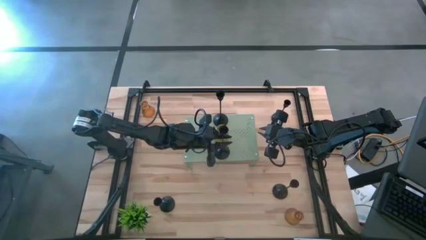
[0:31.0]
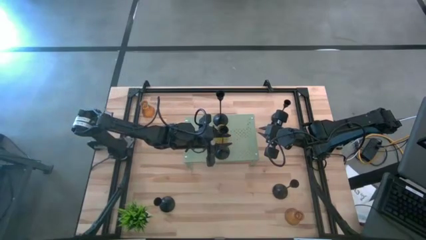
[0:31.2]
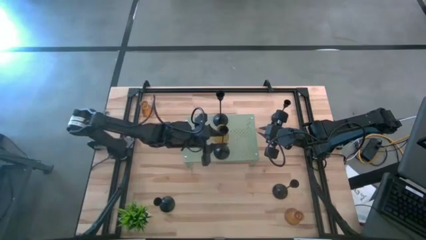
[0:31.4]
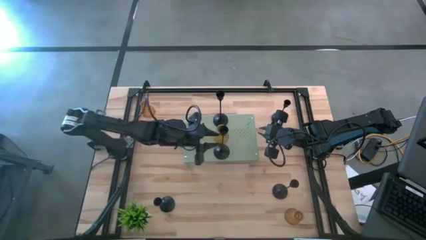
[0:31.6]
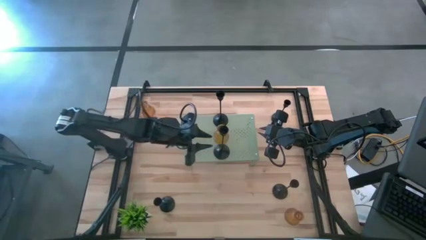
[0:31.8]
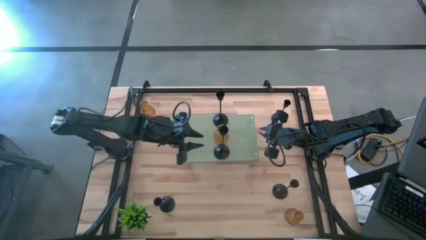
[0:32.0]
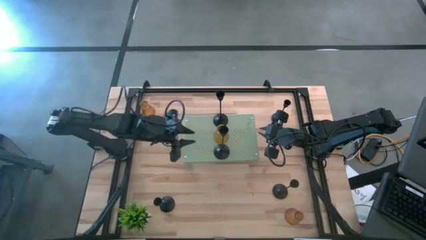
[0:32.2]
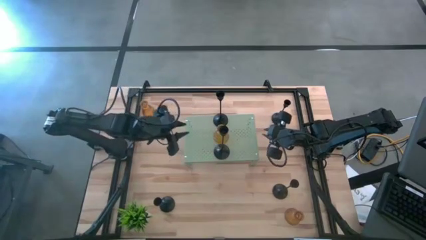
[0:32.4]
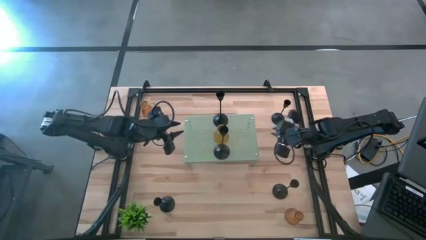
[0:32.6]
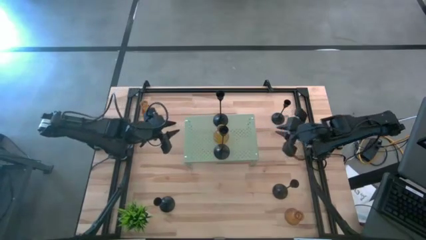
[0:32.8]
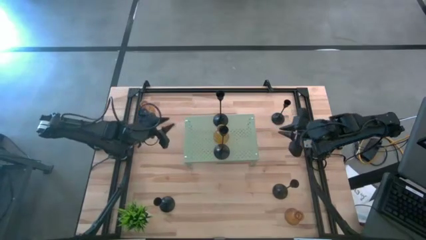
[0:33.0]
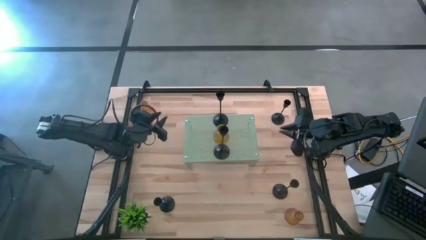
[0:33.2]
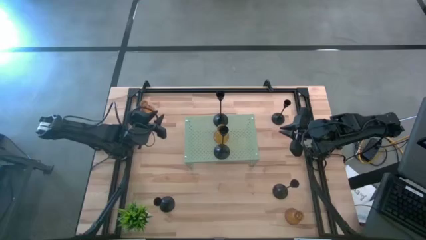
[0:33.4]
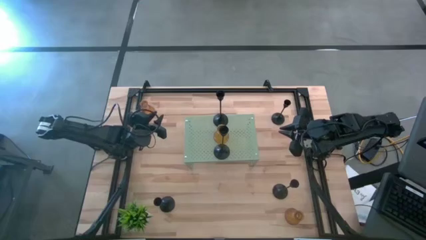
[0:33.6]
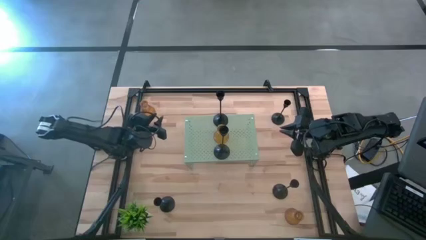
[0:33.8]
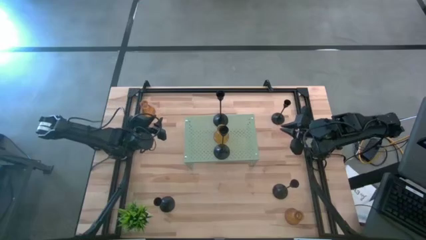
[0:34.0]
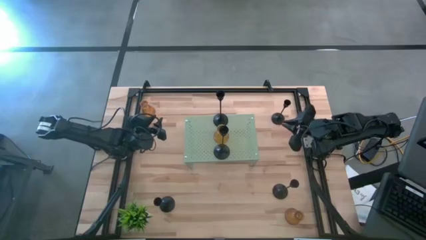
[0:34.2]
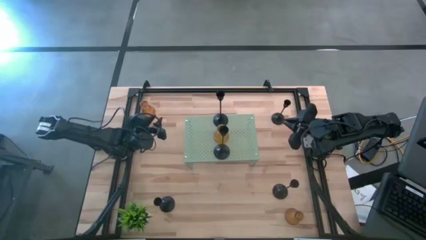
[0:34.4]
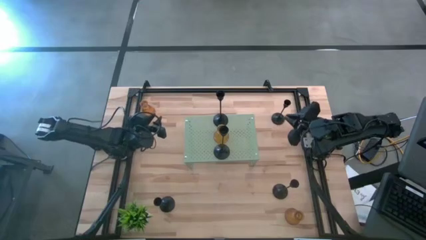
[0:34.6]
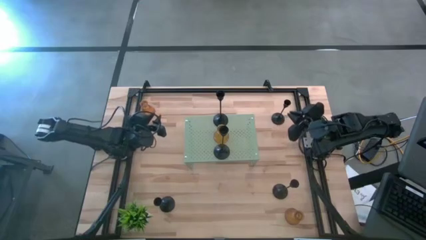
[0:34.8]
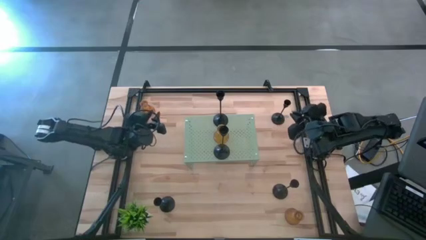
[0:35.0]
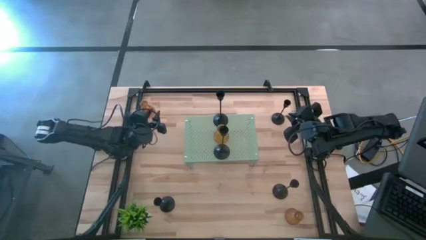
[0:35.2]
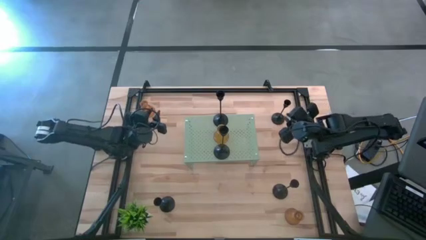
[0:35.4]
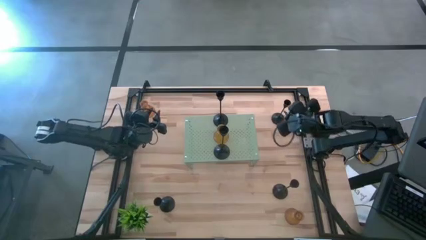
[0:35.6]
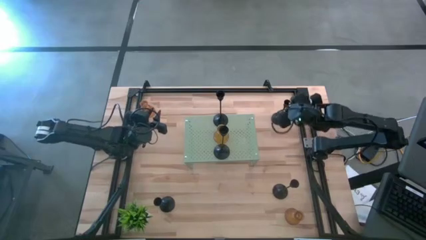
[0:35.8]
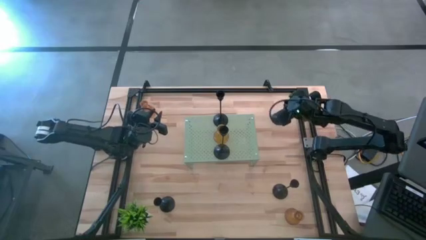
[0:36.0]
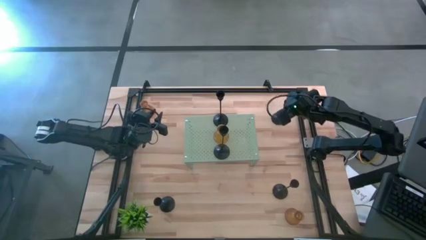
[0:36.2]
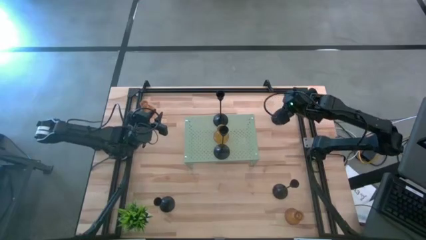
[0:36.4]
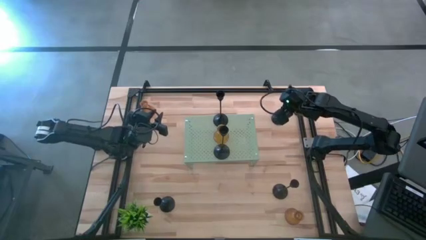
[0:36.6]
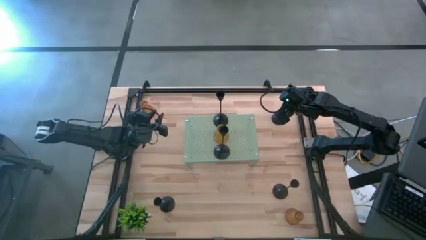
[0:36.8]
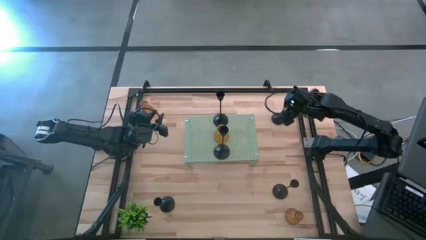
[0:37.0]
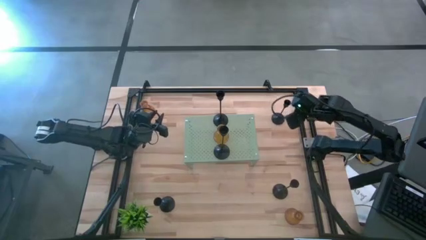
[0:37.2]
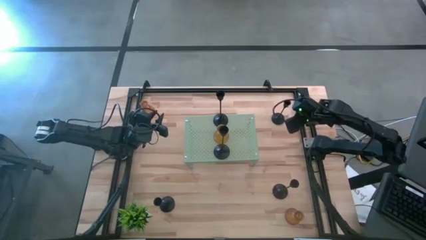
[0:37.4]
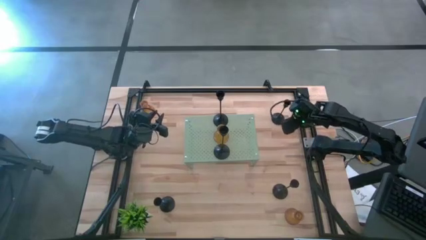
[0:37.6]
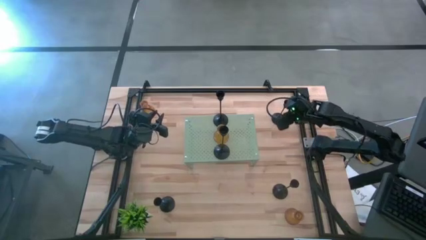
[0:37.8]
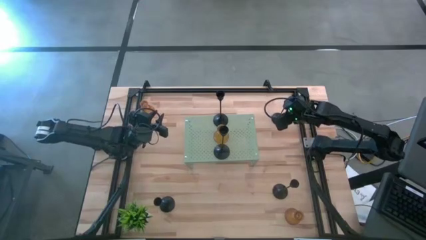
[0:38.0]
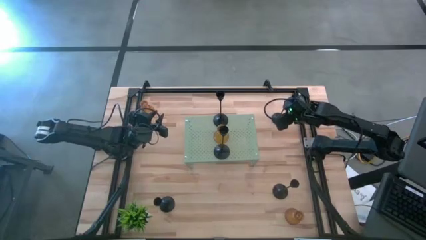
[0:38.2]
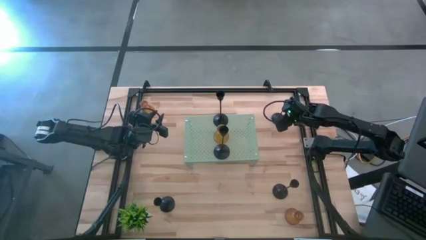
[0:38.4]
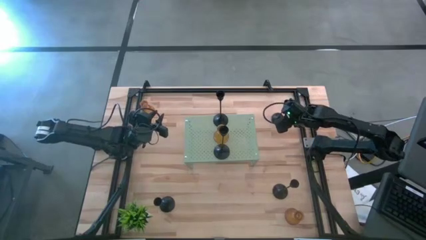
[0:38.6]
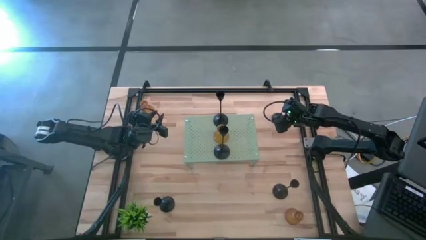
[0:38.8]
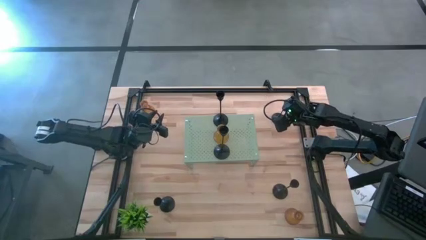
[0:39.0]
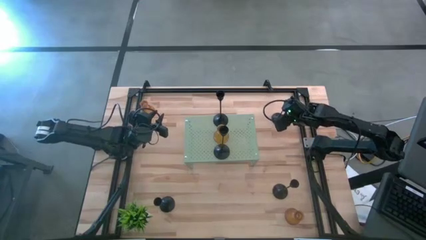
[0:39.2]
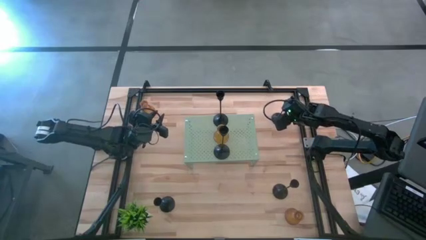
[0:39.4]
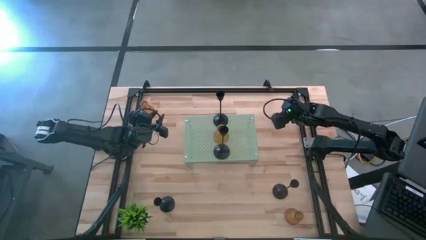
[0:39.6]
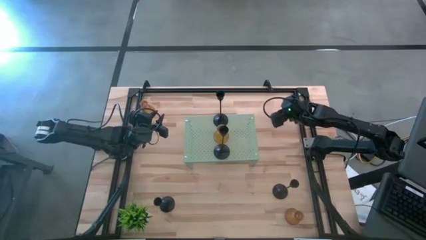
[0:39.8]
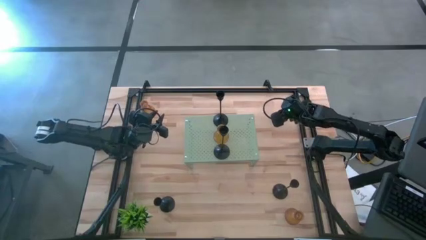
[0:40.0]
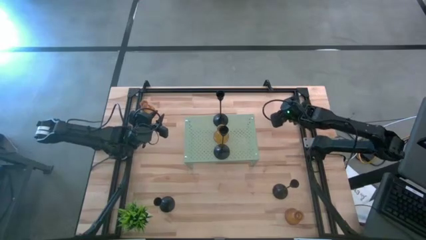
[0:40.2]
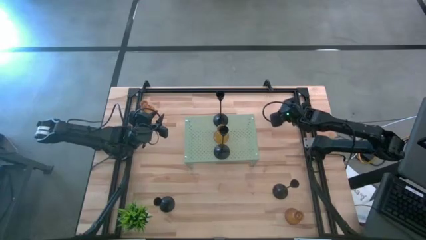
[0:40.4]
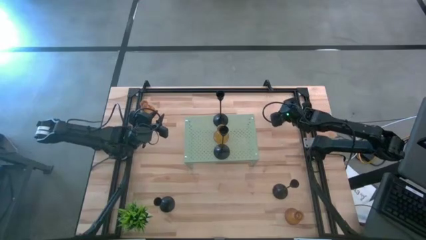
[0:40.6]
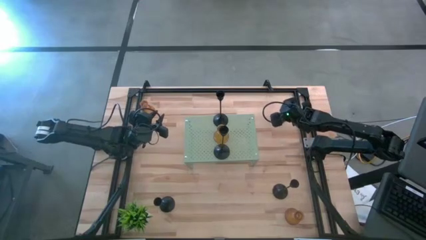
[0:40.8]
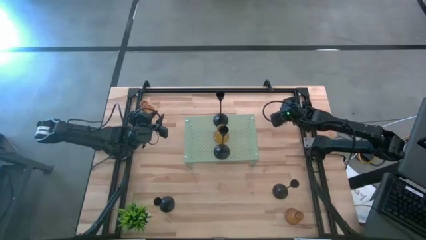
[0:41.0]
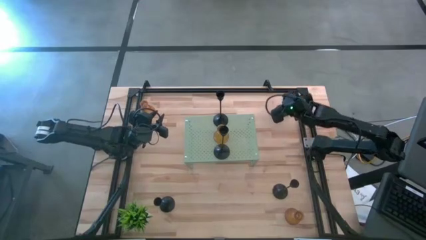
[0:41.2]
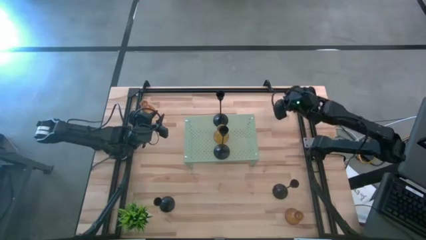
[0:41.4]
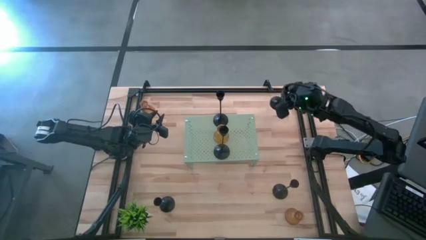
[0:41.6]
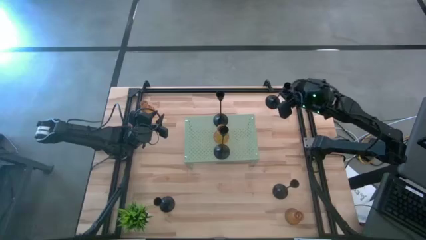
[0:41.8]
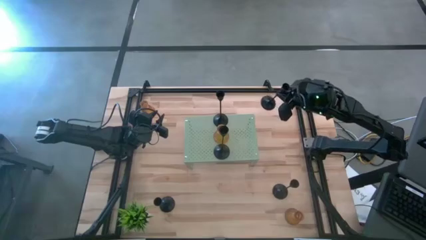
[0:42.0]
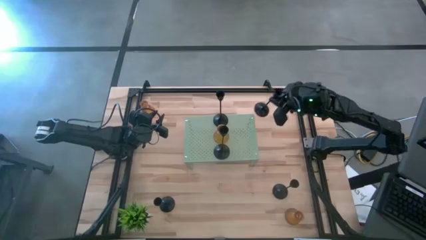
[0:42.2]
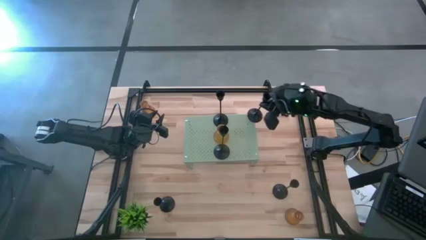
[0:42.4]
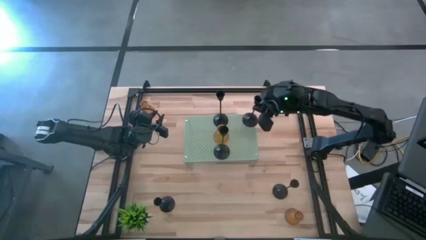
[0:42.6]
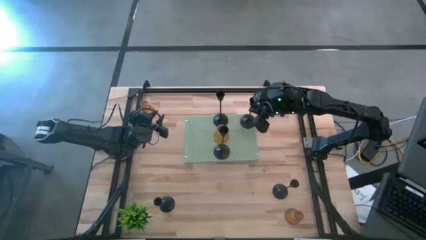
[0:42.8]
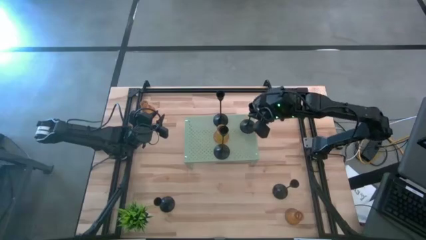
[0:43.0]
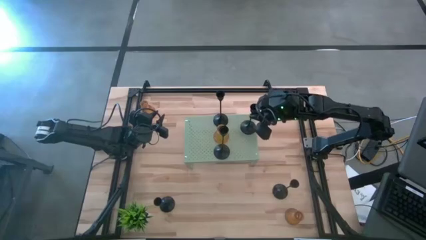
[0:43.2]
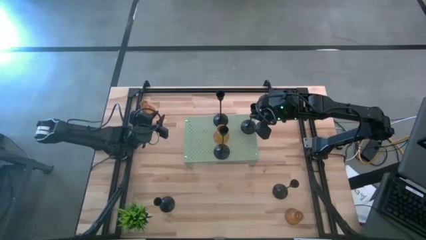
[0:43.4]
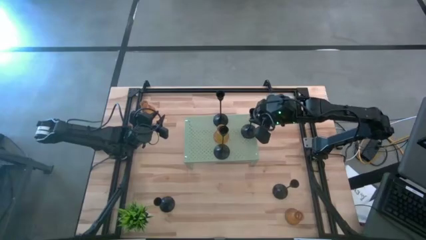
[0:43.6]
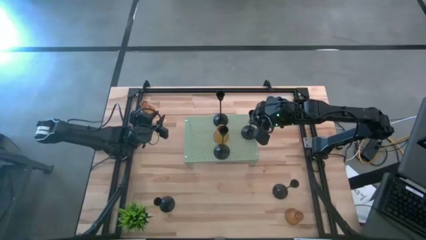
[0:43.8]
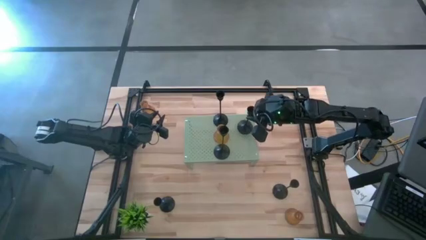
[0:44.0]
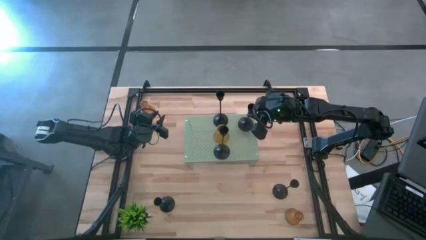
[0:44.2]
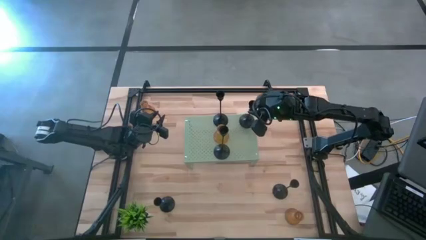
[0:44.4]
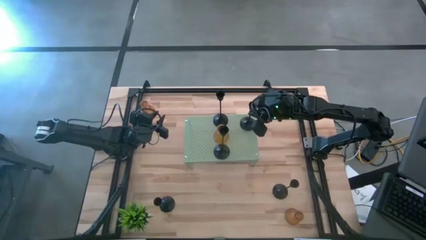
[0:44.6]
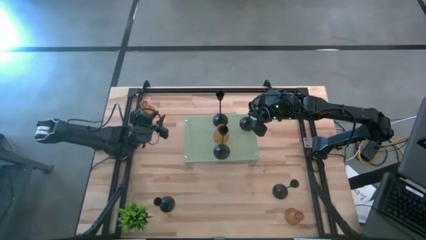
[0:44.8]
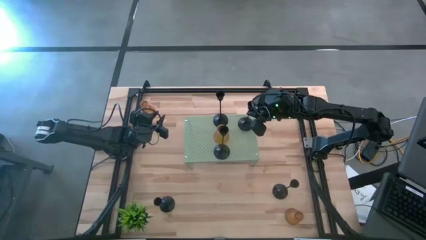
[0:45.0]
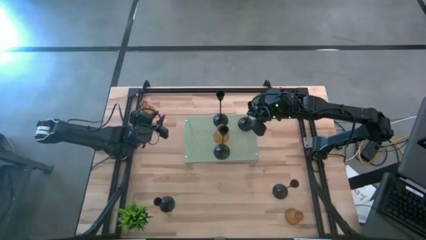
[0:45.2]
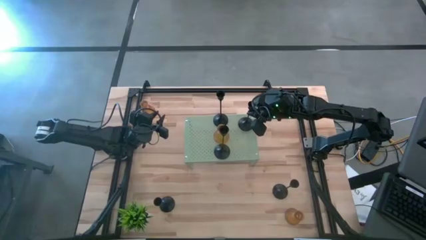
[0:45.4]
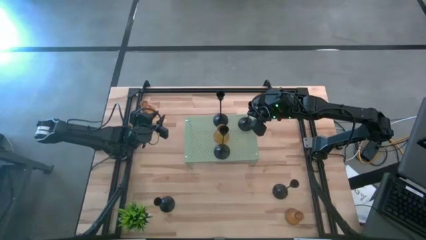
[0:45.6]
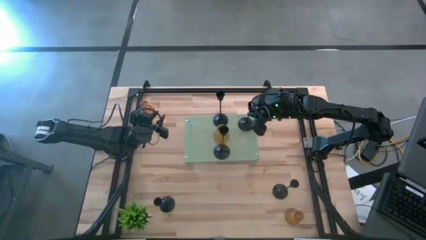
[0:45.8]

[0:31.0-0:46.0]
Task: Pick & Place candle stick holders
Put the black candle holder on the shelf
